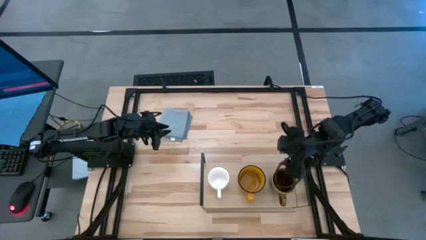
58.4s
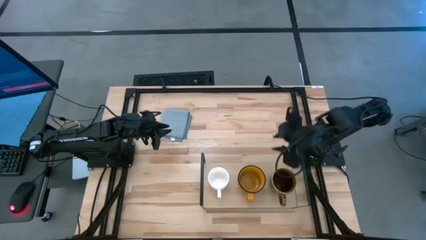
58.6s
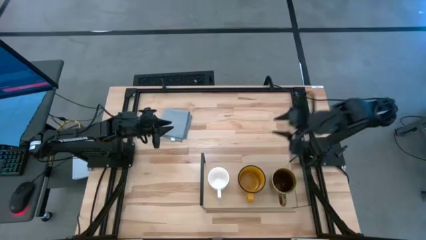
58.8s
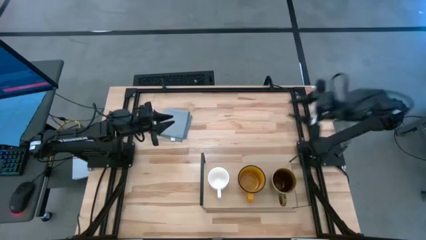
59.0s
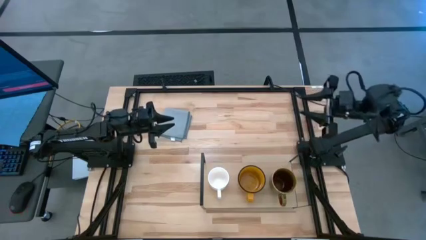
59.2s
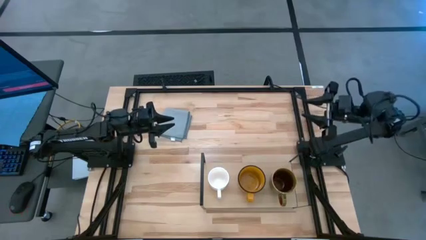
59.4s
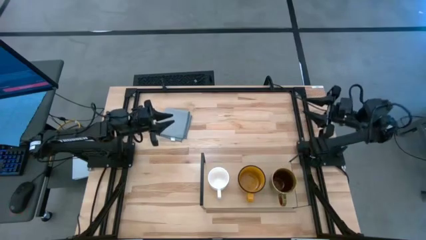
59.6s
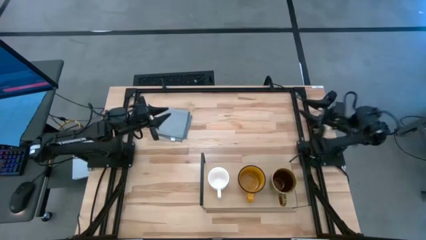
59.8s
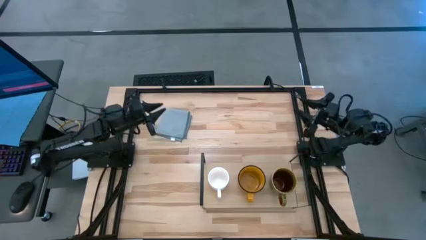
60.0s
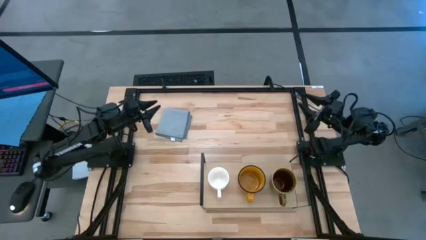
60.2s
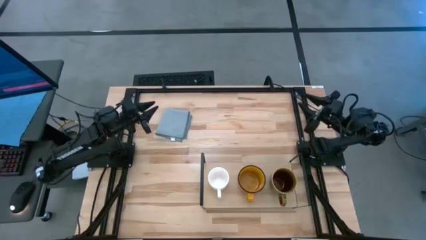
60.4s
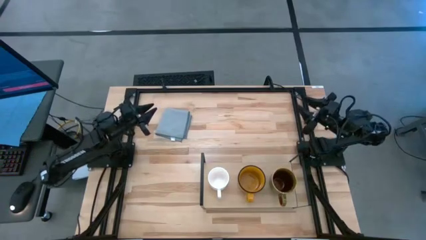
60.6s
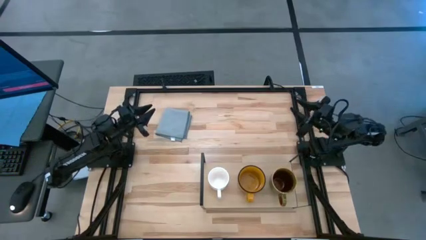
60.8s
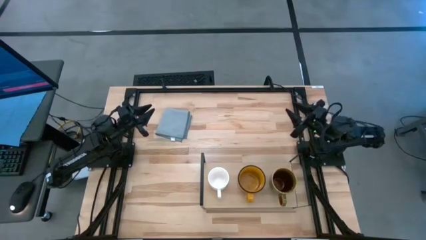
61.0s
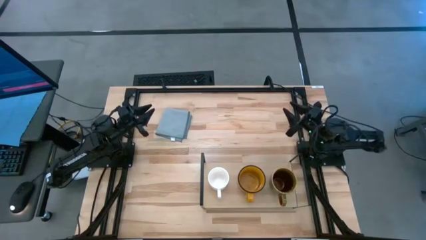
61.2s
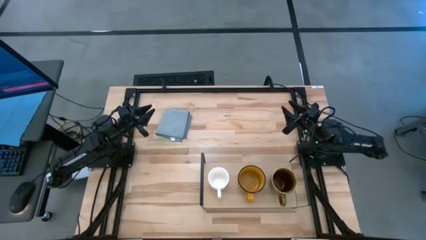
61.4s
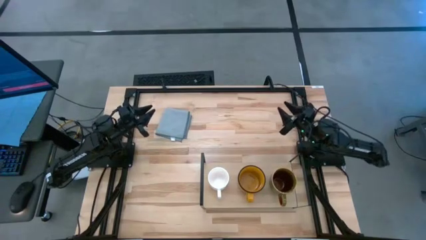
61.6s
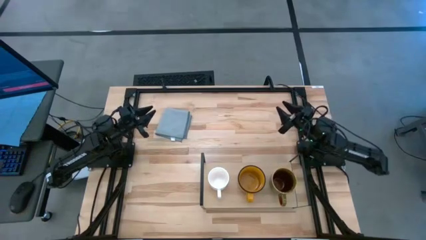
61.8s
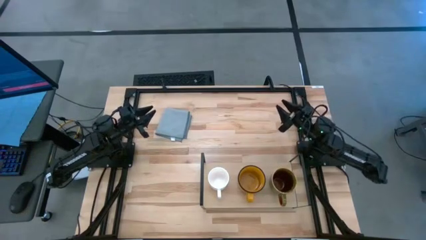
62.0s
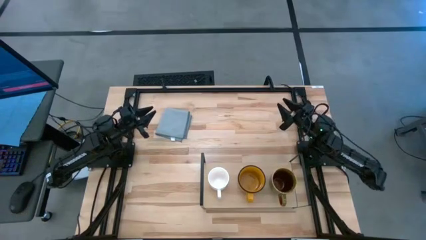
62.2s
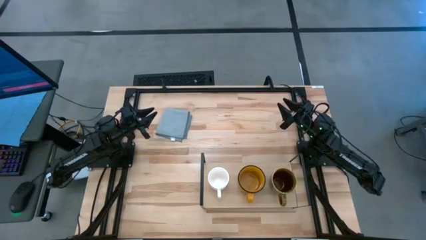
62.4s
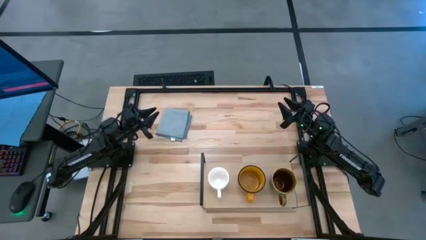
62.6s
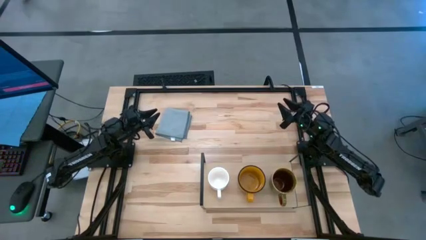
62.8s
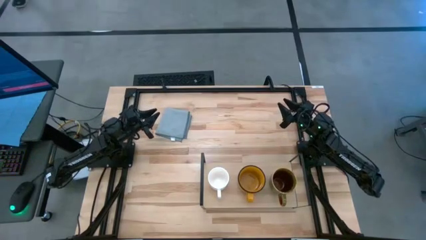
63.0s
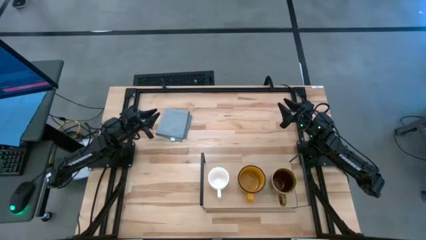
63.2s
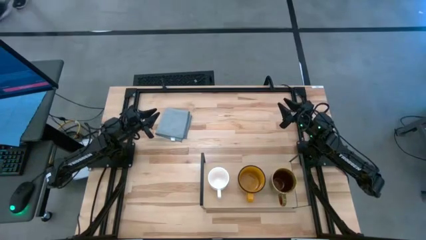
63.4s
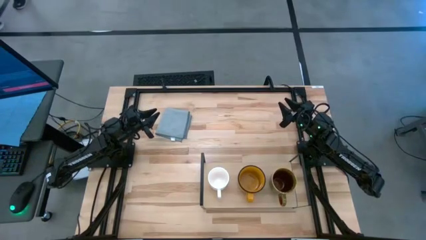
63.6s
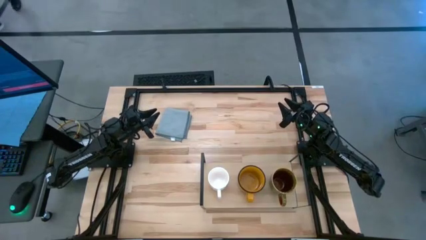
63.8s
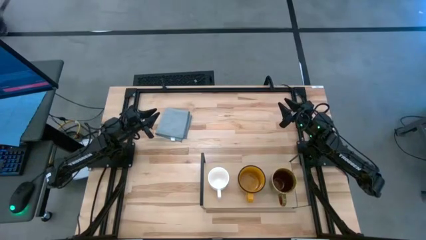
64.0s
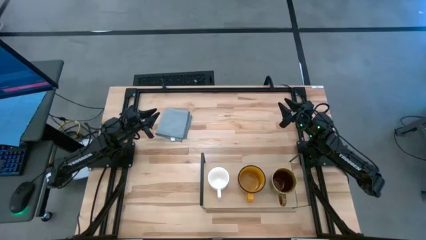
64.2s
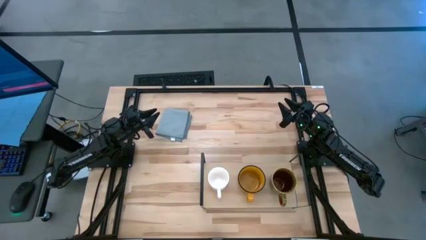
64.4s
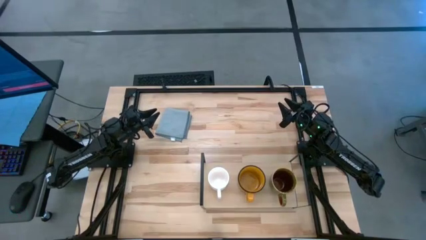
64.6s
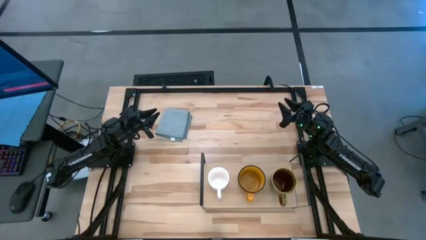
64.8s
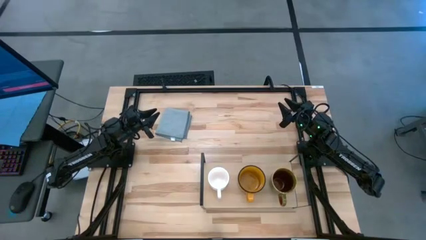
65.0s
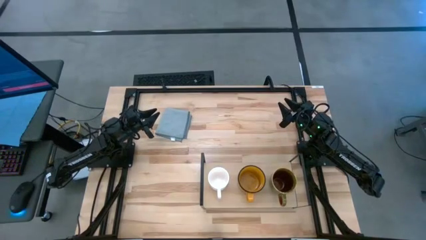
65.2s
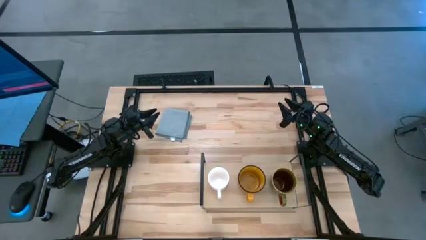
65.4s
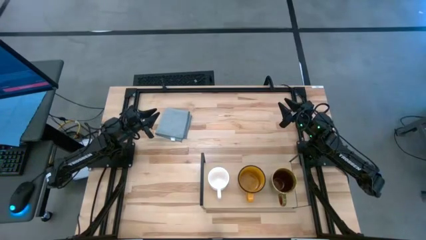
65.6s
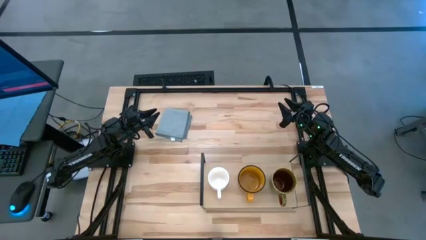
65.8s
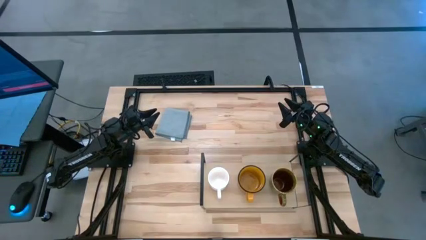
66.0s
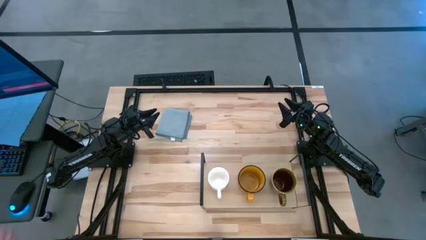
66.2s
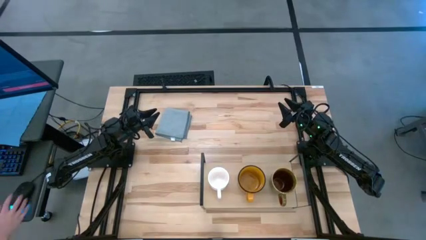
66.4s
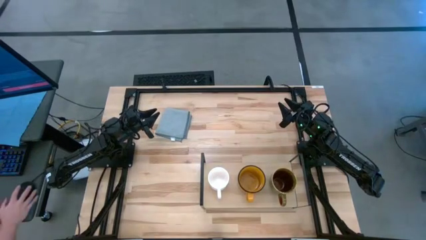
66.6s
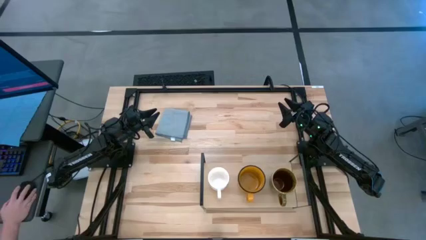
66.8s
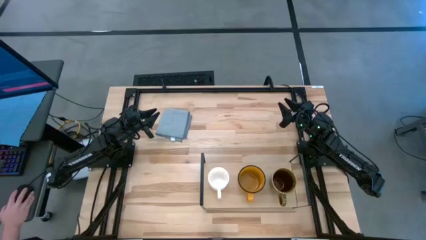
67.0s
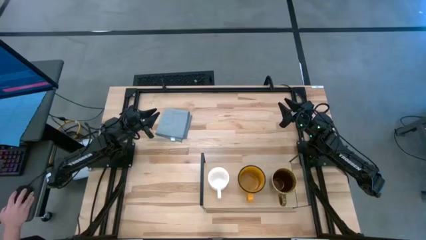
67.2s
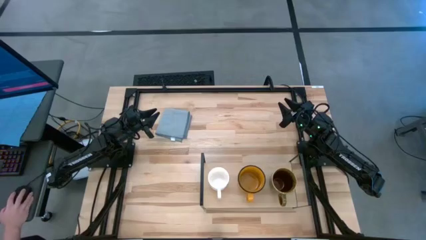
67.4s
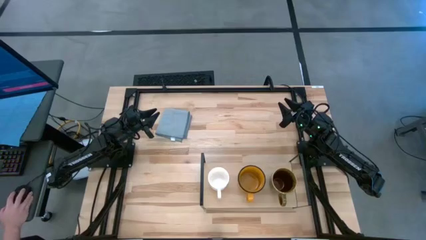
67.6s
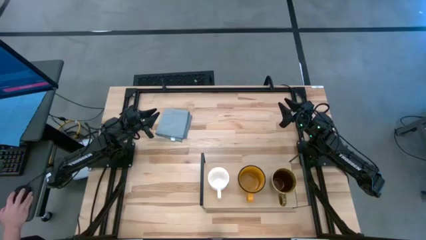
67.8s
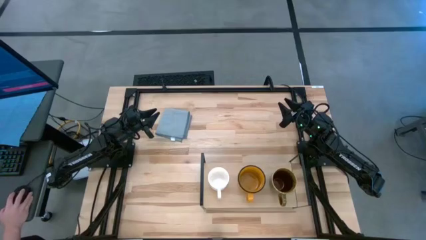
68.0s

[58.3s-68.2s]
Task: Stack small to large cups/mugs on shelf
Return to Home Position

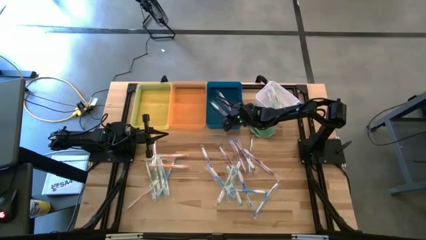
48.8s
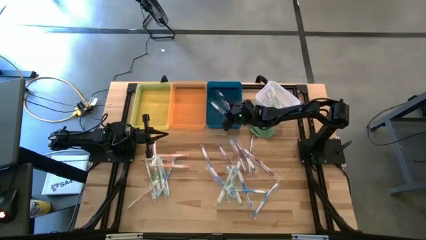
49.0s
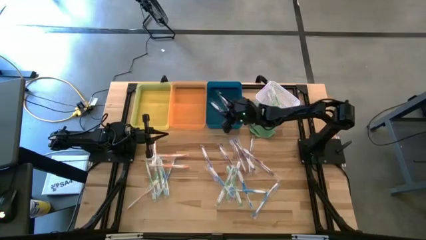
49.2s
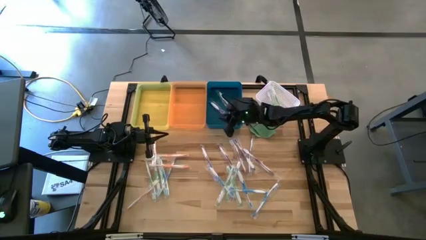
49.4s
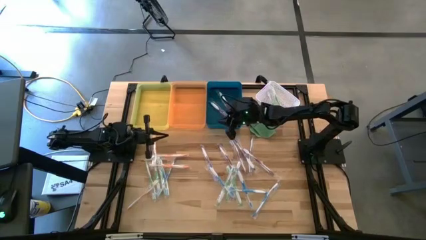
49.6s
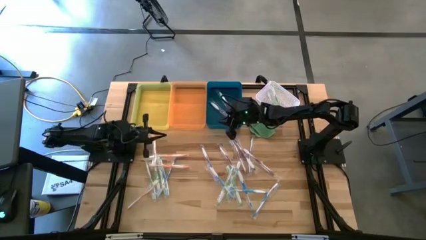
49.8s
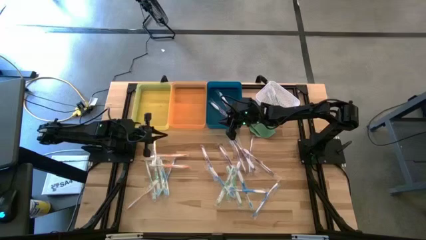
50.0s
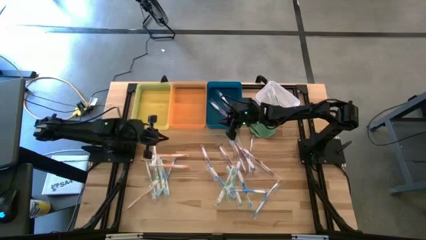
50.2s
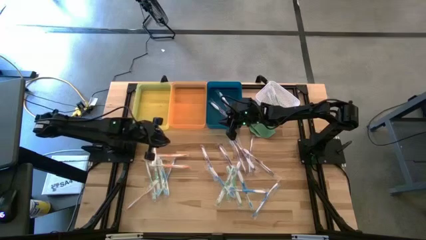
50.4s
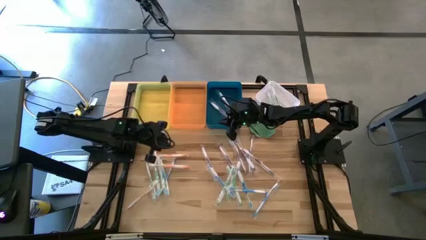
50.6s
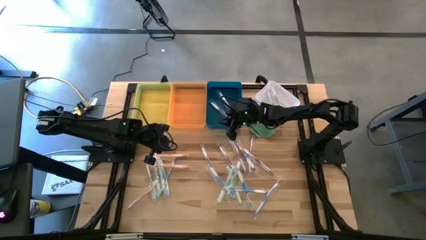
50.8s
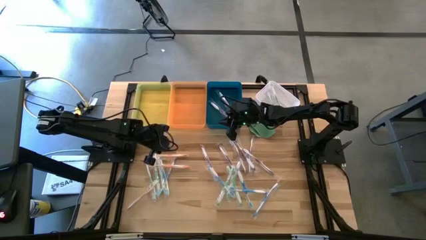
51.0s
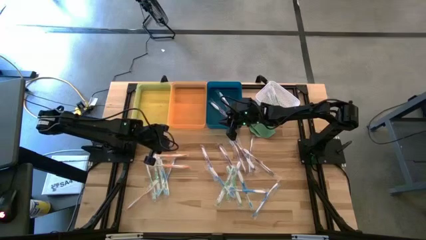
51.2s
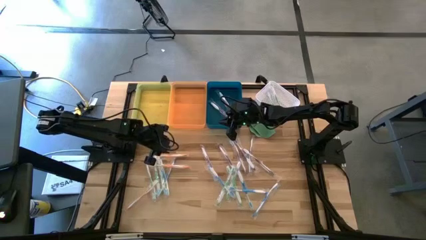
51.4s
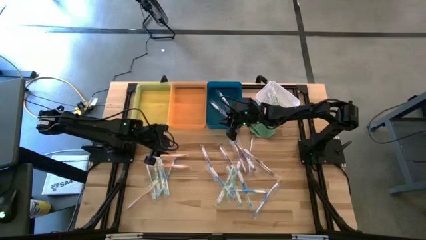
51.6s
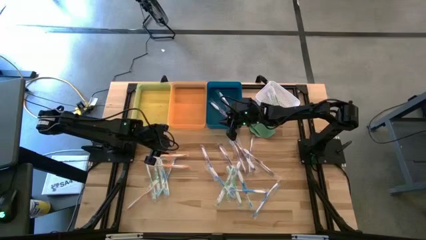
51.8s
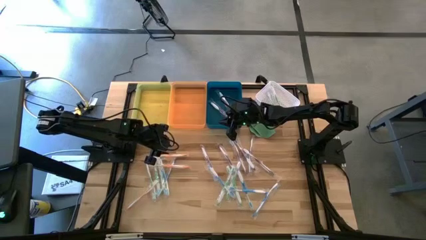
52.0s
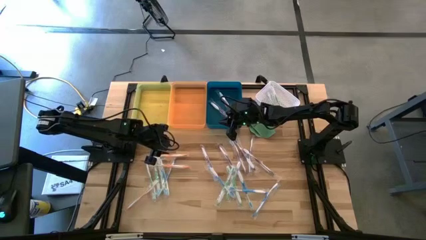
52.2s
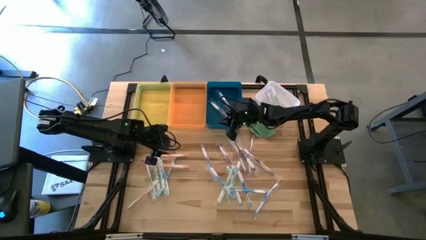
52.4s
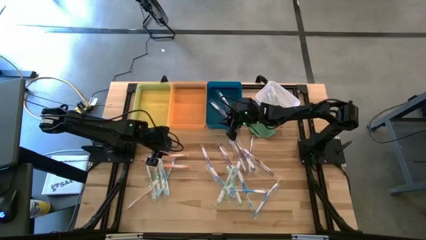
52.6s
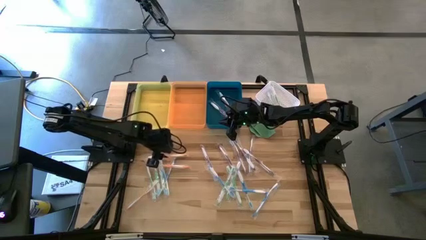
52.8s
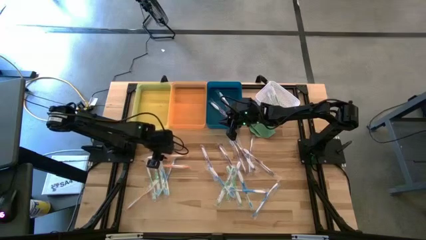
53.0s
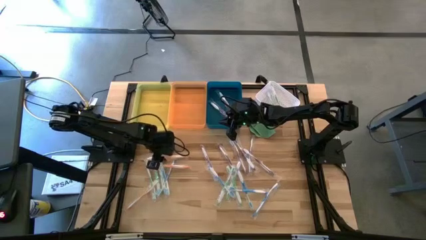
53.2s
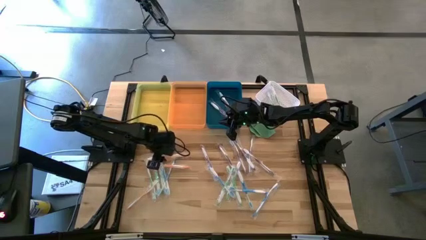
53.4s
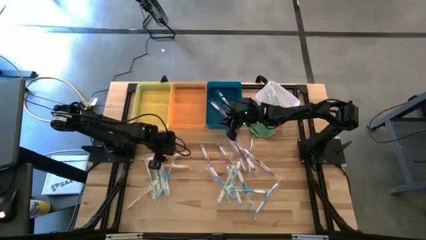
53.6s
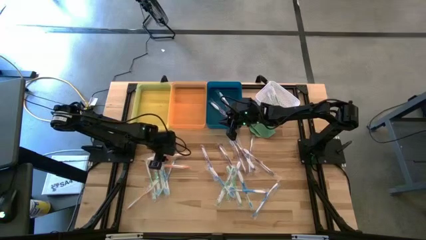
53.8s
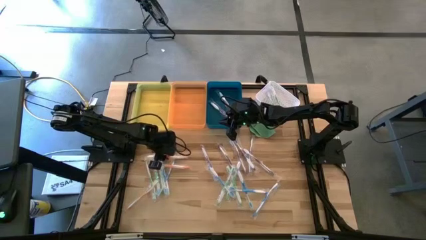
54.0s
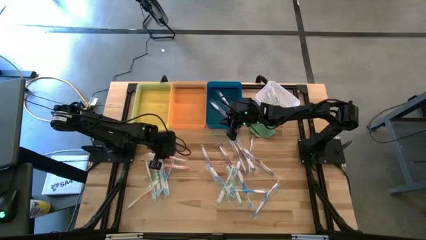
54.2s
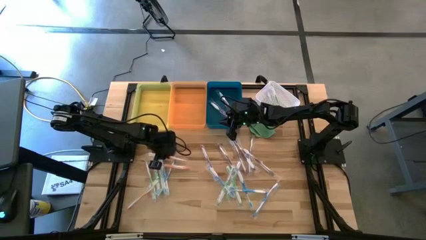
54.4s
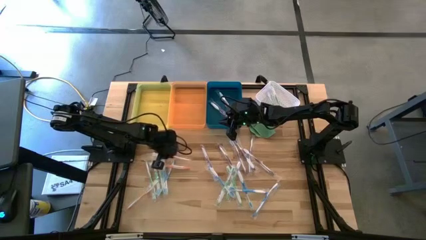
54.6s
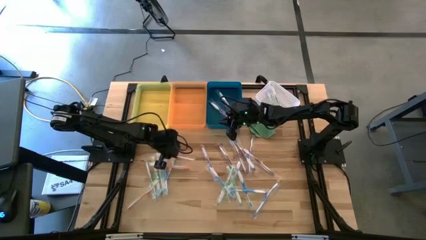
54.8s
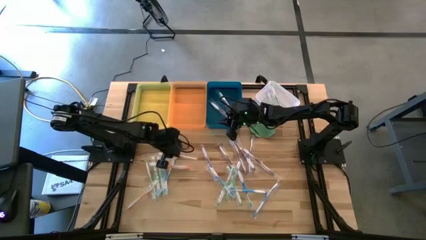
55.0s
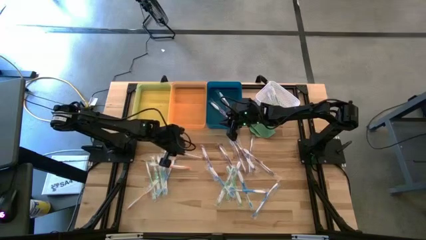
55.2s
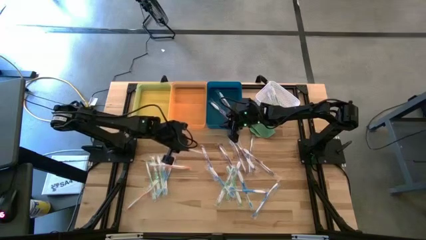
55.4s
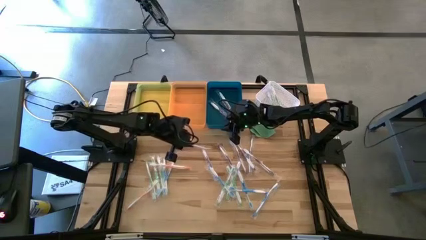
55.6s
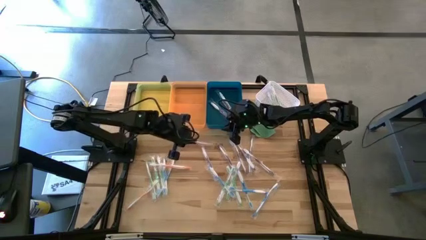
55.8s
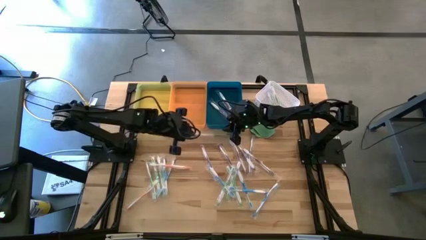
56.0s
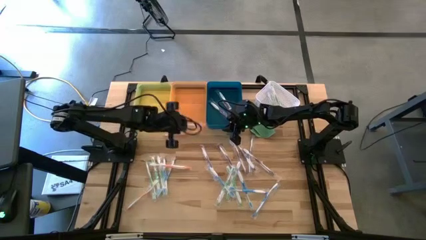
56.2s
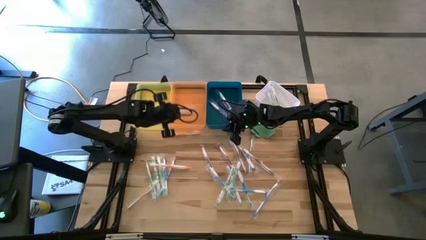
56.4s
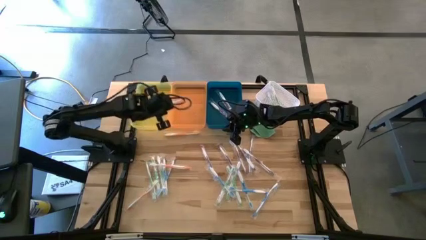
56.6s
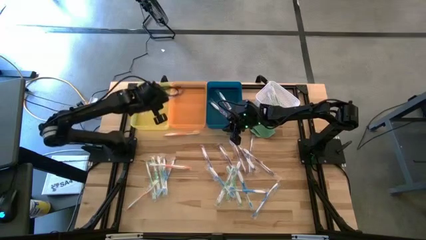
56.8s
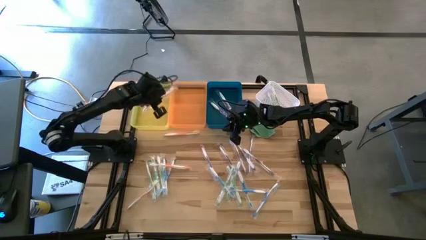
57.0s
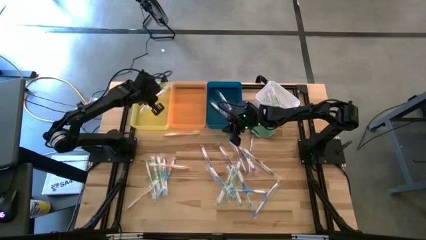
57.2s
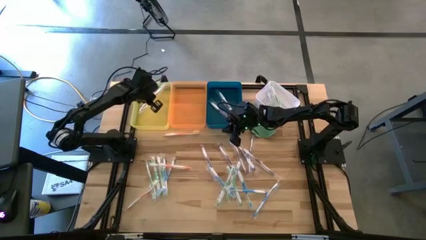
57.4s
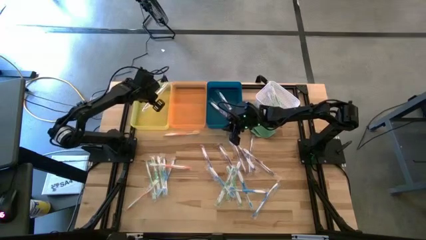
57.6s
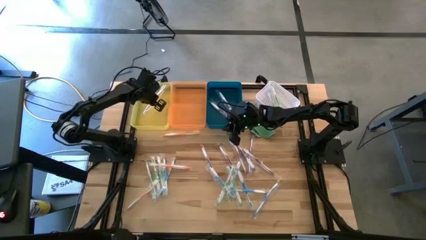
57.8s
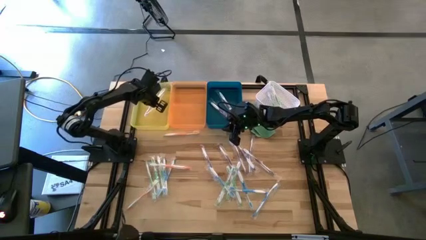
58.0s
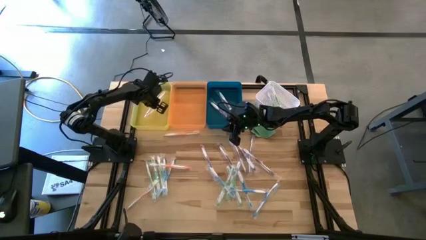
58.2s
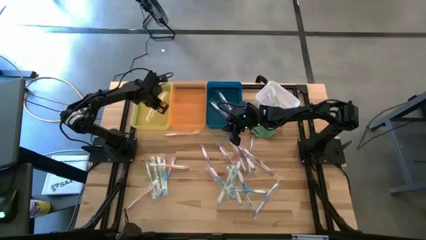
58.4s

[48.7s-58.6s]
Task: Pick & Place Toothbrushes
Put the yellow toothbrush into the yellow bin
